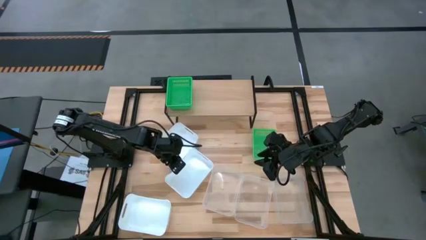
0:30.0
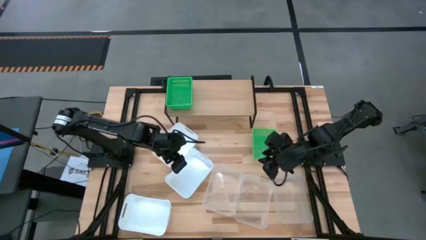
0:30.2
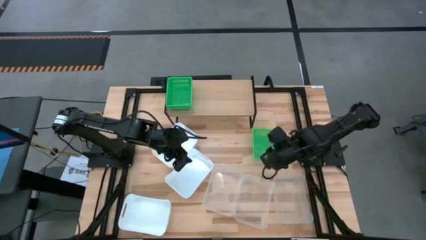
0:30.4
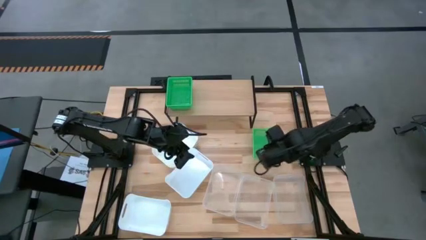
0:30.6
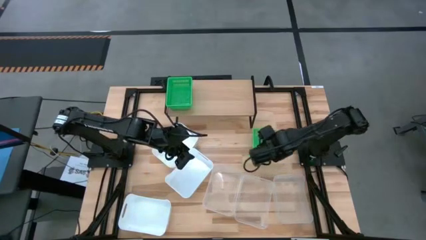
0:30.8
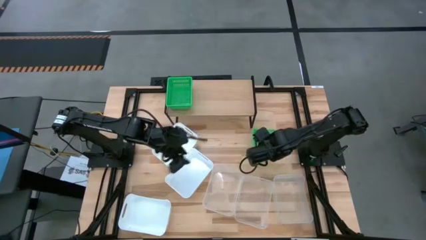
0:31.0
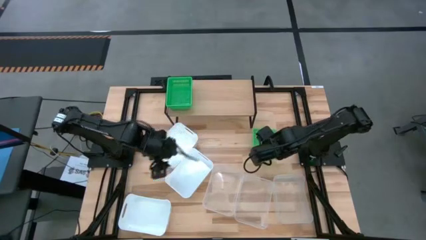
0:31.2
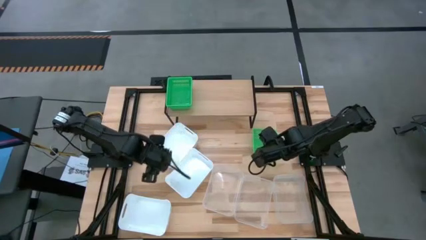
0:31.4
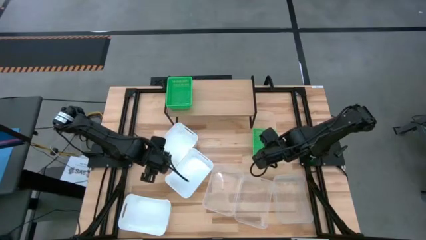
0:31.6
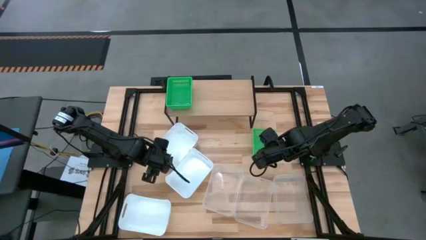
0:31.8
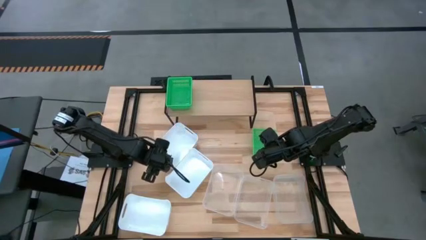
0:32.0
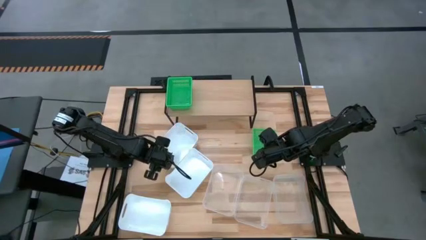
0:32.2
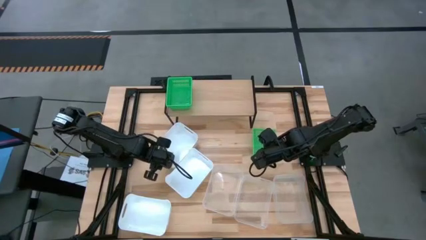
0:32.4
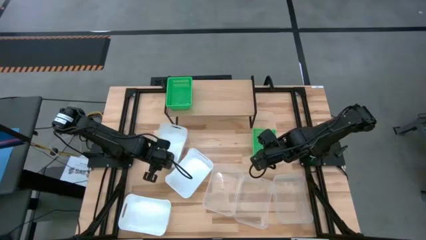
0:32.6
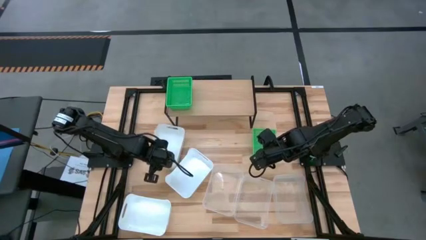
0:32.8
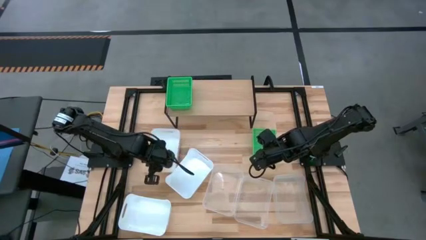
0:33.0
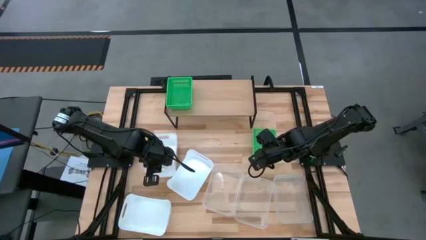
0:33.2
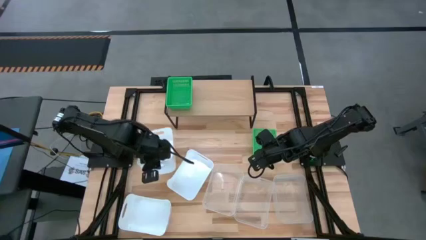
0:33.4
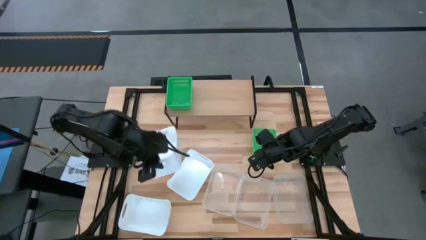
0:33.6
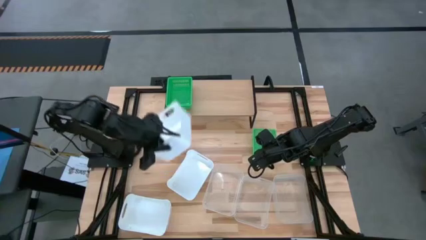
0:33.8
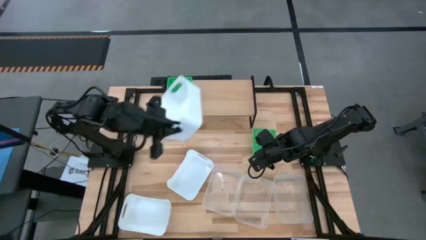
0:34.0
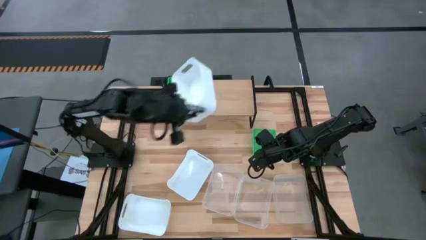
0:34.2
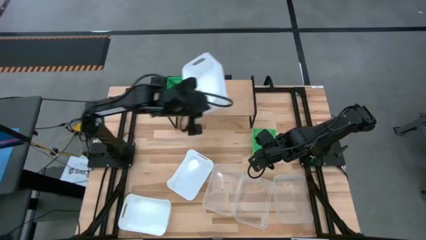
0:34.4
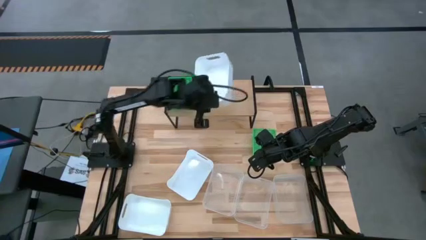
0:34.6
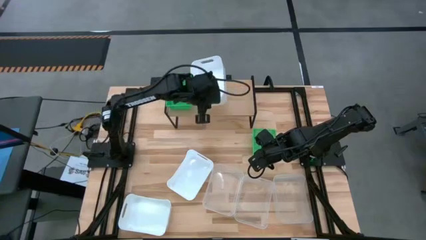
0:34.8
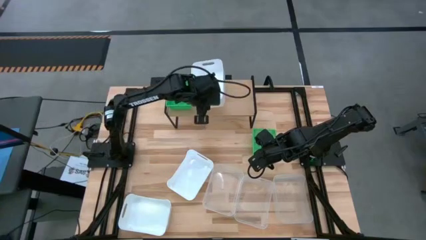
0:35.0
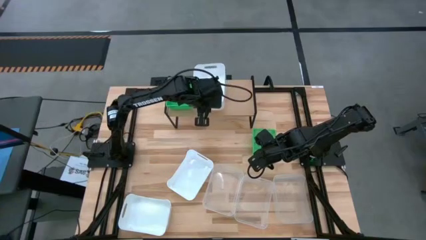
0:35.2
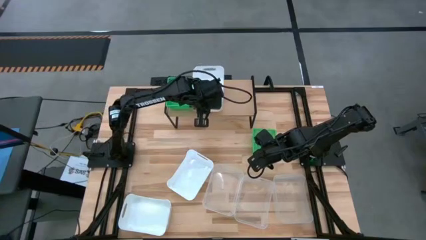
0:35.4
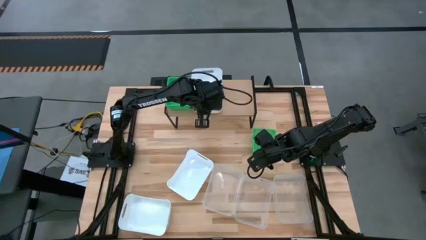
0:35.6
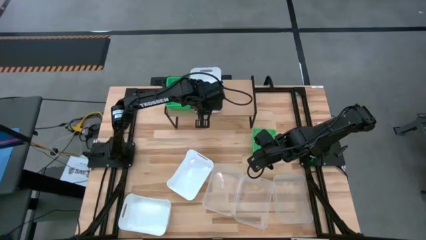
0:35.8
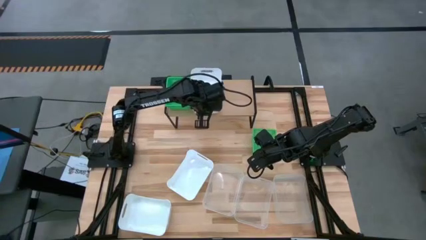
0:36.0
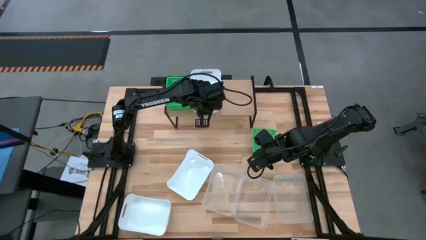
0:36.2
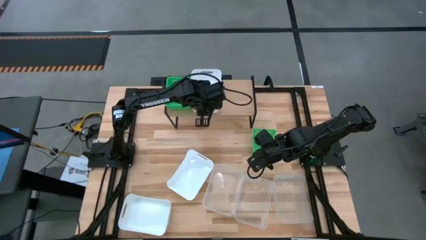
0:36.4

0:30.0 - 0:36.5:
Task: Stack baskets on shelf by color
Put the top white bin on the shelf

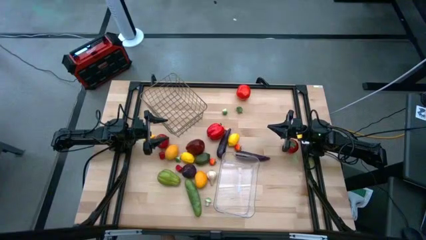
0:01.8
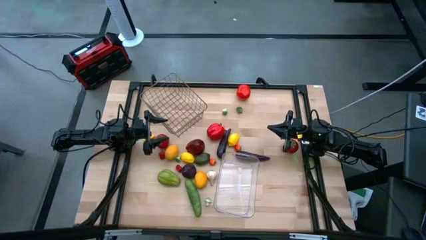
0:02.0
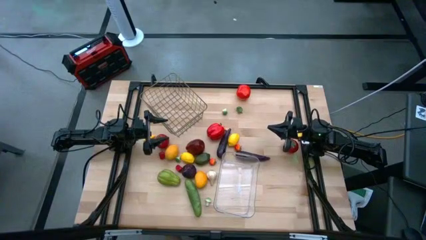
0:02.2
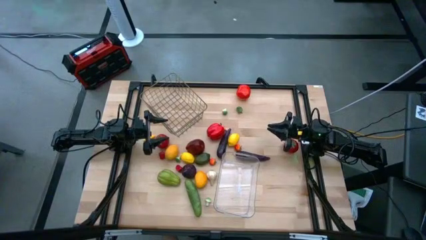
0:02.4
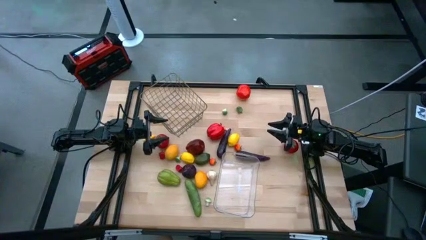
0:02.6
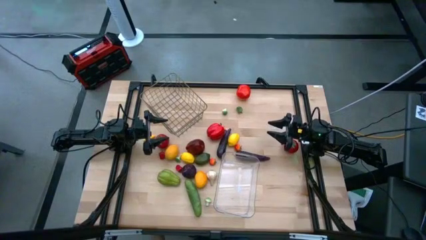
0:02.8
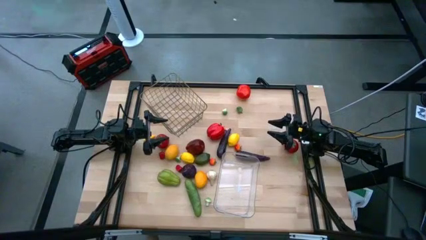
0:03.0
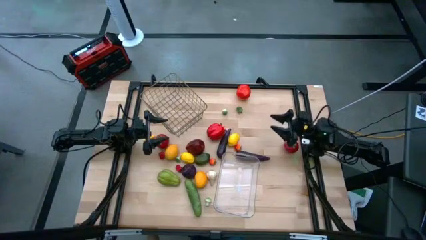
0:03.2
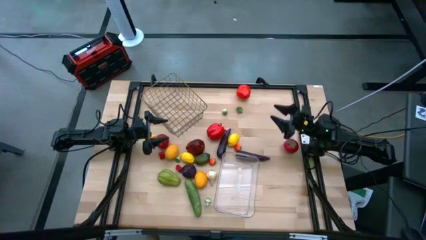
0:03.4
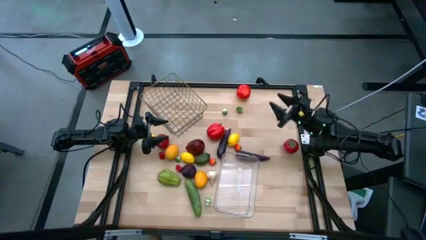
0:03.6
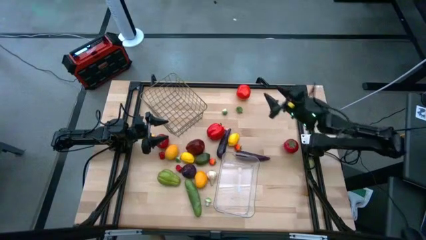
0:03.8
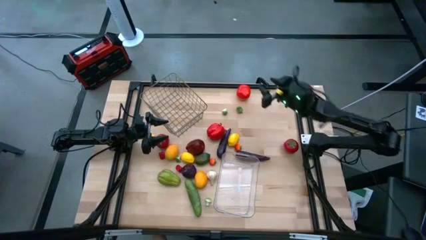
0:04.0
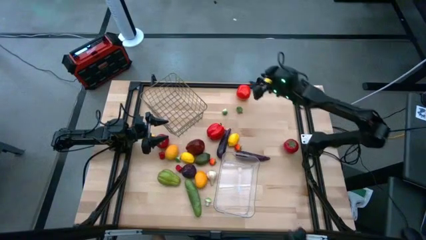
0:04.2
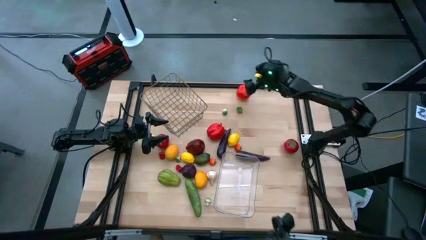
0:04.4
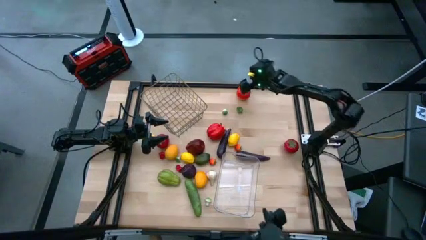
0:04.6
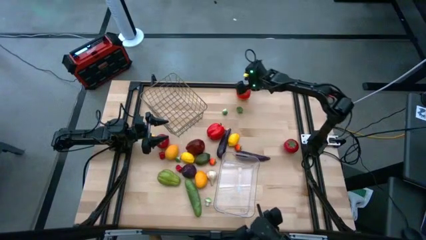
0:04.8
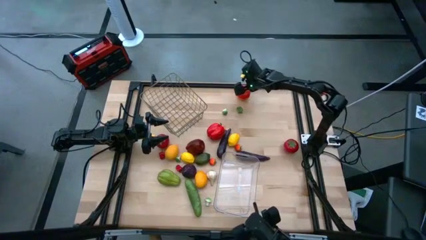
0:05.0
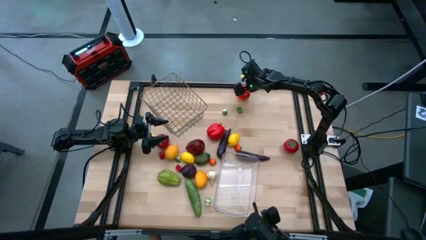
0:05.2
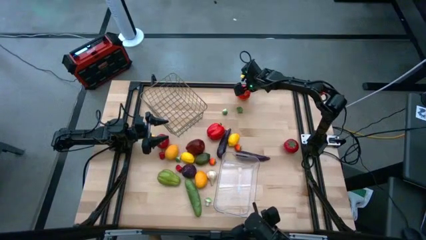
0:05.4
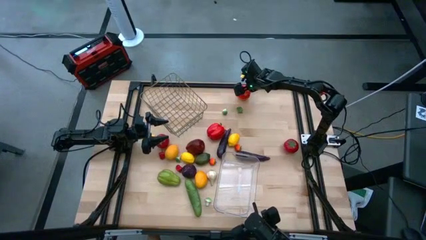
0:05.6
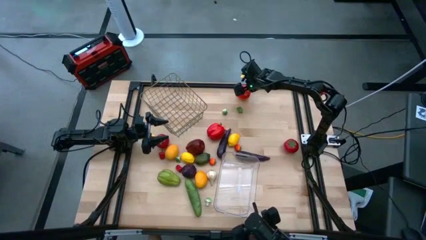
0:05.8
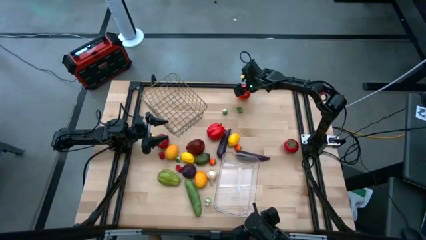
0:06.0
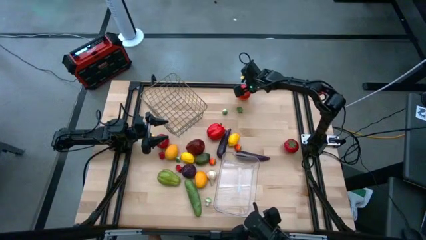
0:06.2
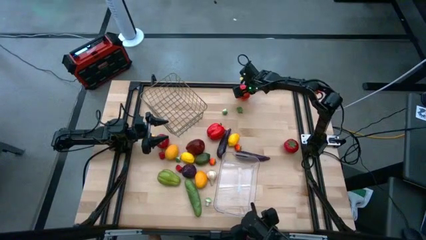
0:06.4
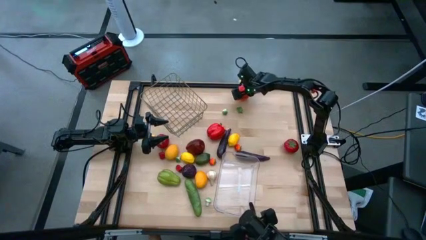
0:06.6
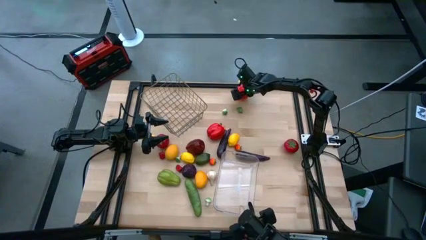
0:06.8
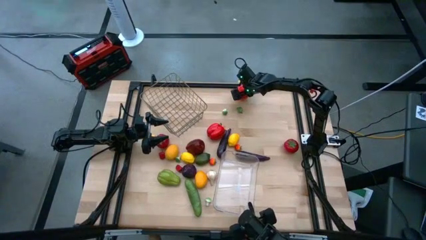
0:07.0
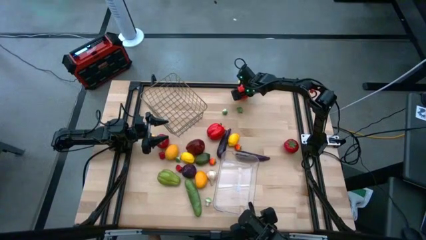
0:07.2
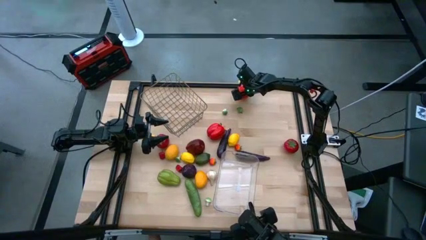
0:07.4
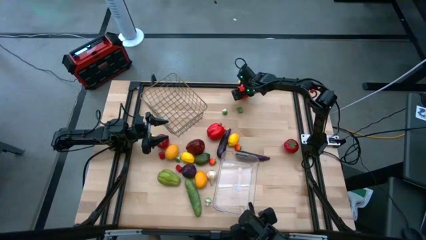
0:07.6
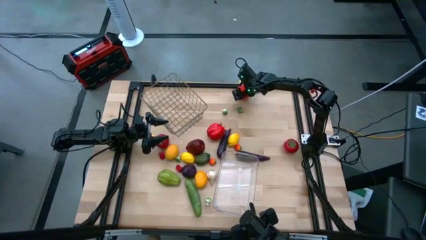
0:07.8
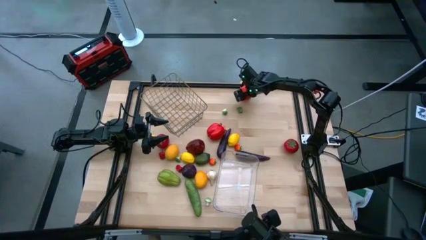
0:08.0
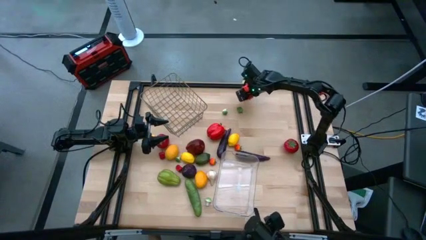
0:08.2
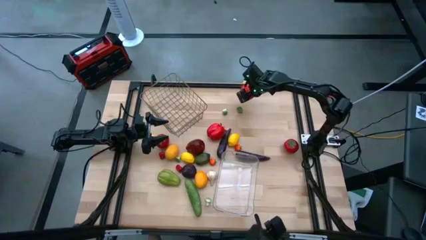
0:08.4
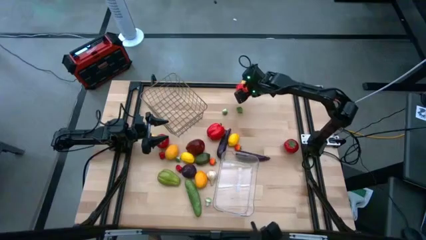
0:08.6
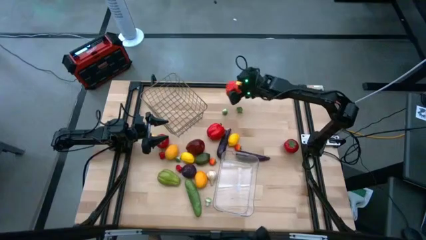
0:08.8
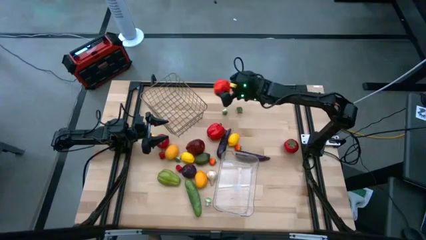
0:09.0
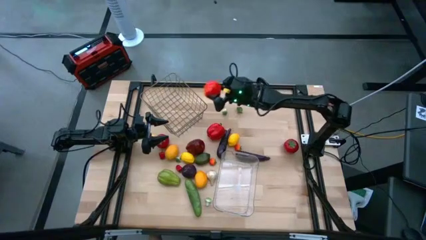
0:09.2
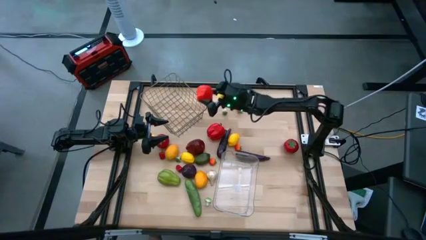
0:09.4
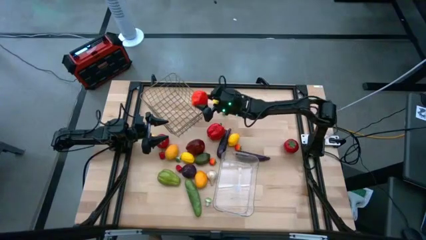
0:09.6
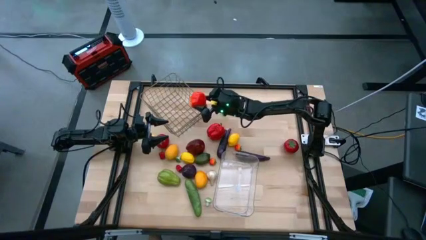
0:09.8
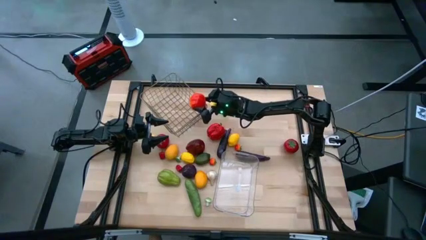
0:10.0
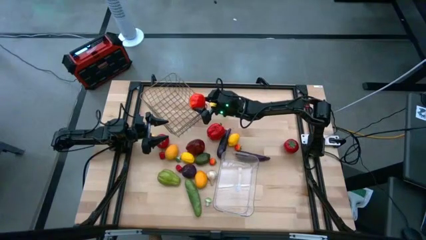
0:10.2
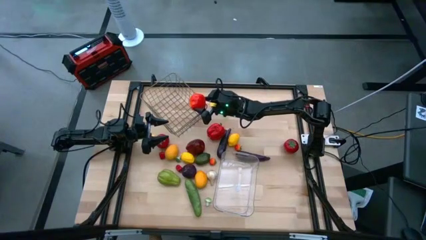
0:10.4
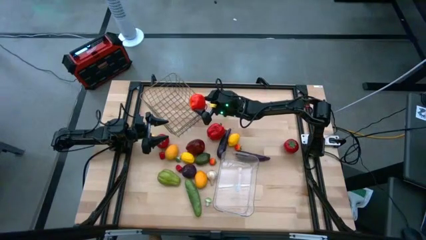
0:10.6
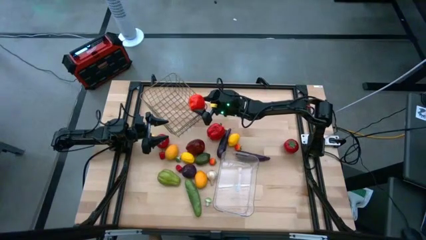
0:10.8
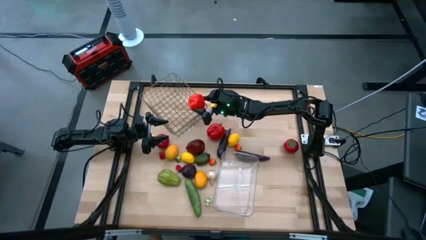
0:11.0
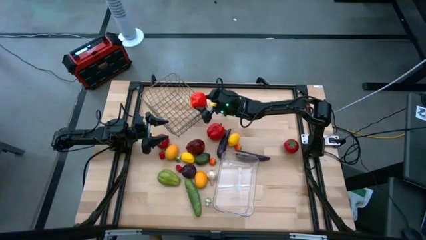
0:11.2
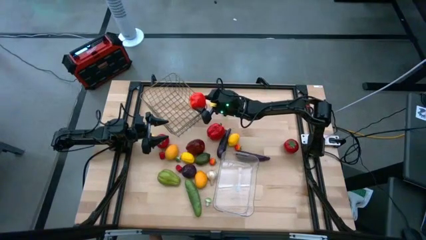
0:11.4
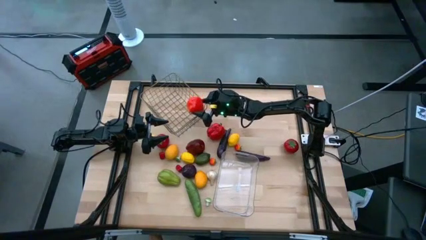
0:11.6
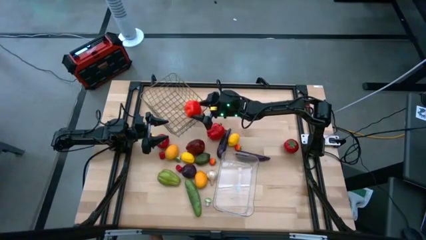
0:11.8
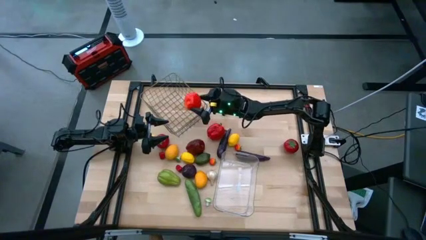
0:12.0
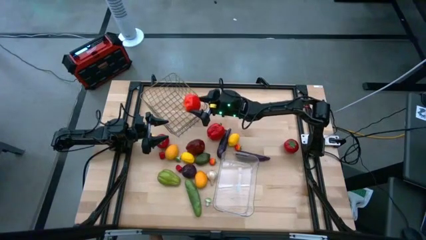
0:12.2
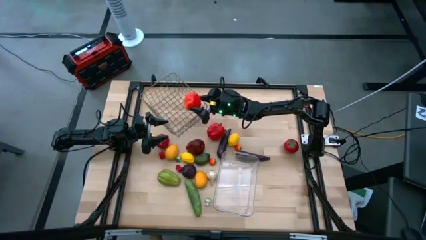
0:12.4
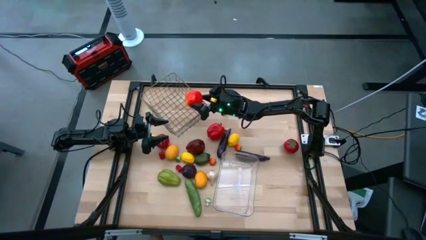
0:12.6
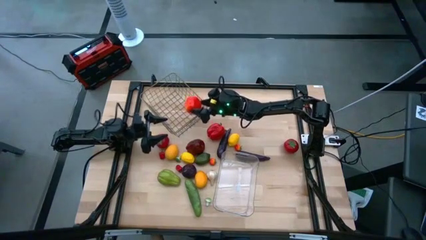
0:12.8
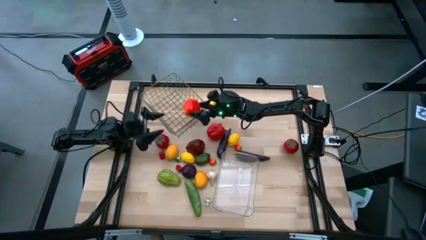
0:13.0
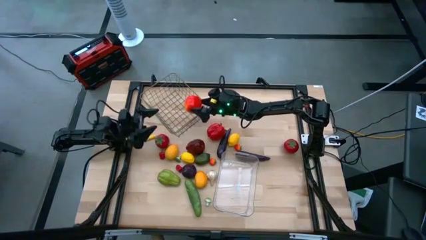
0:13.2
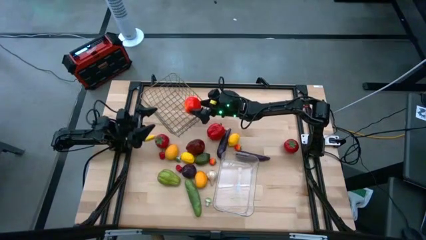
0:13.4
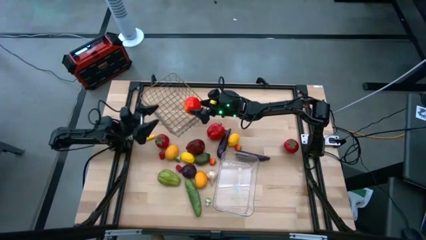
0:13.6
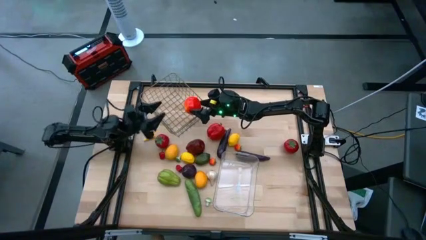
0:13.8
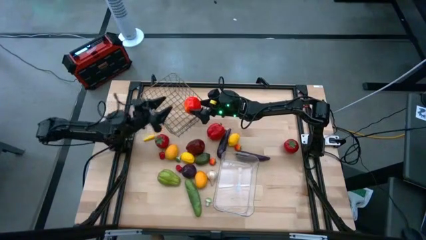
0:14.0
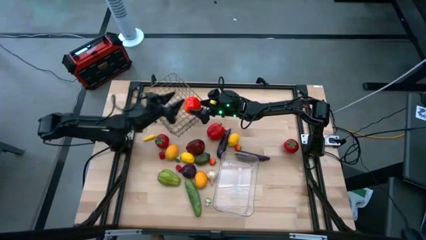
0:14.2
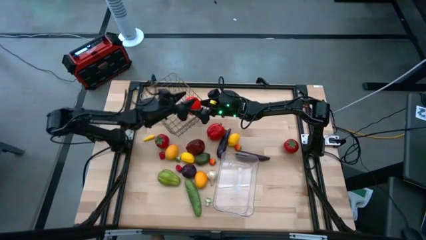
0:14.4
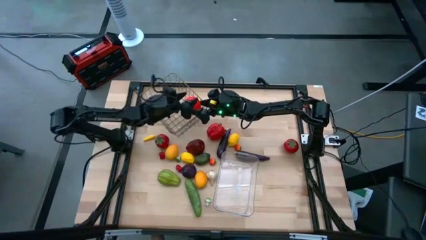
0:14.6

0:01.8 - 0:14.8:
Task: Sort produce into baskets
Put the red apple into the wire basket
